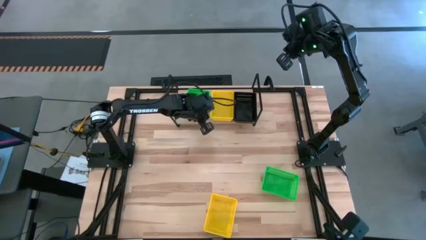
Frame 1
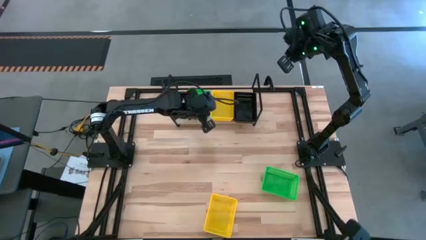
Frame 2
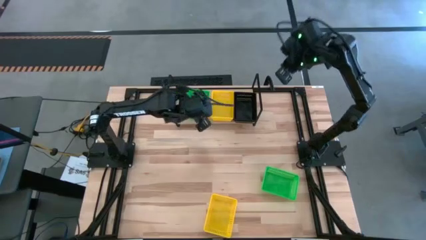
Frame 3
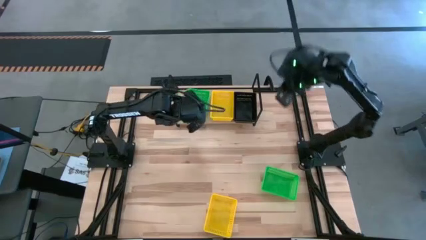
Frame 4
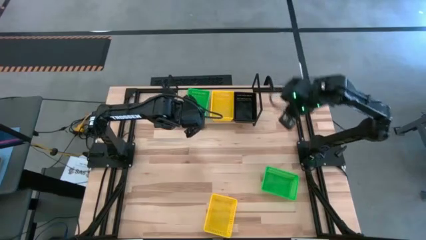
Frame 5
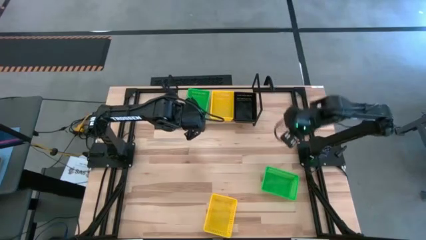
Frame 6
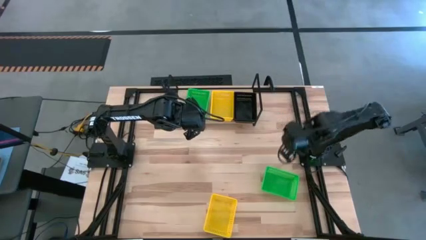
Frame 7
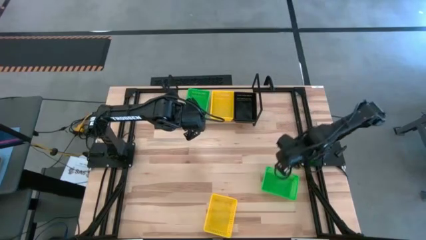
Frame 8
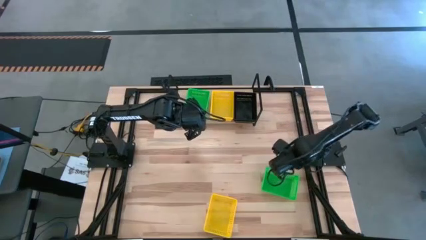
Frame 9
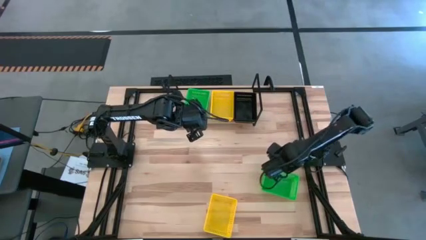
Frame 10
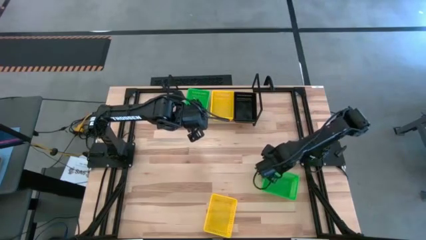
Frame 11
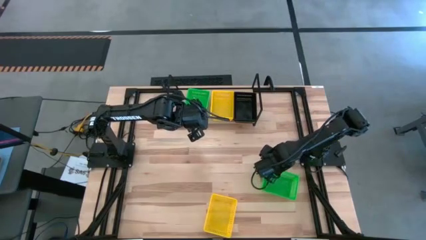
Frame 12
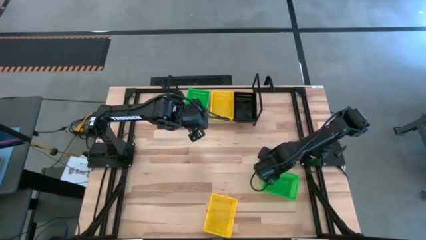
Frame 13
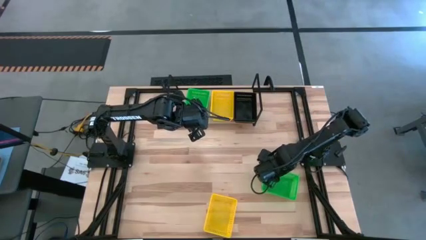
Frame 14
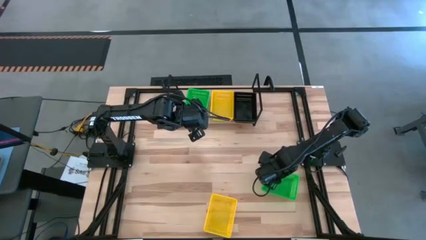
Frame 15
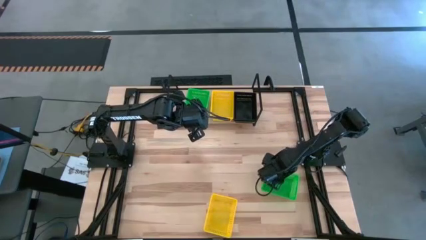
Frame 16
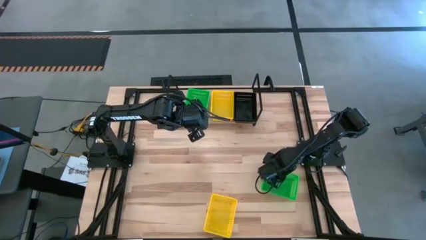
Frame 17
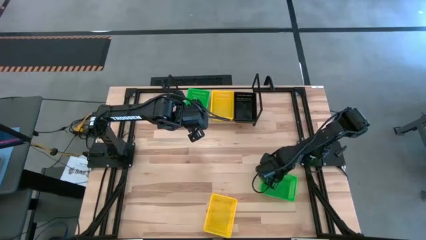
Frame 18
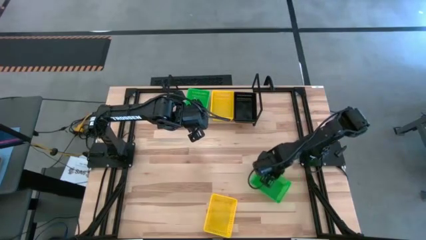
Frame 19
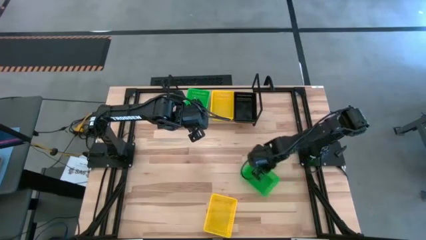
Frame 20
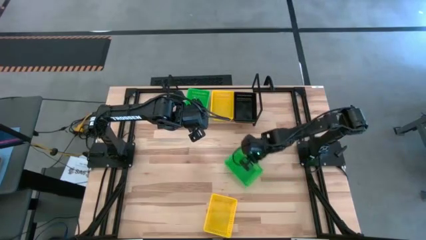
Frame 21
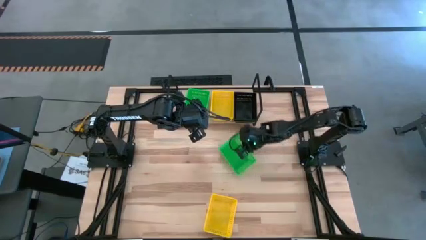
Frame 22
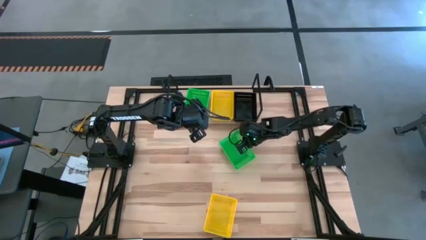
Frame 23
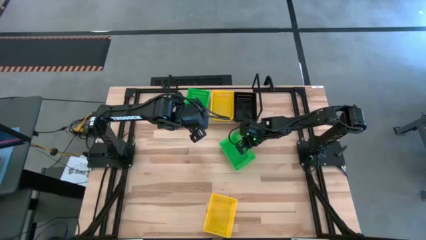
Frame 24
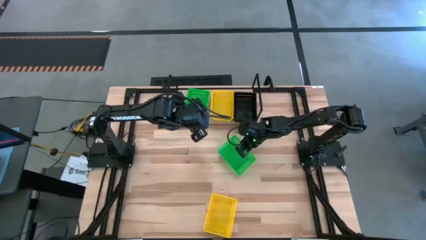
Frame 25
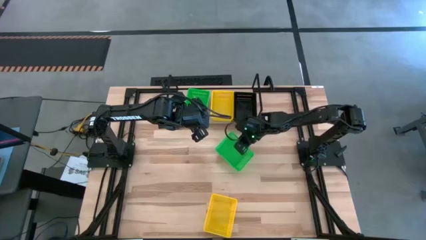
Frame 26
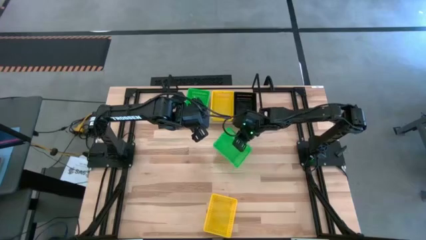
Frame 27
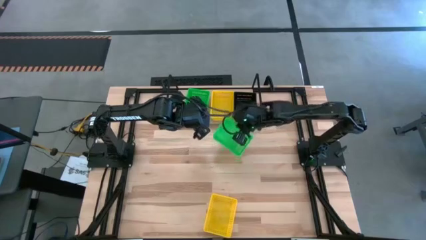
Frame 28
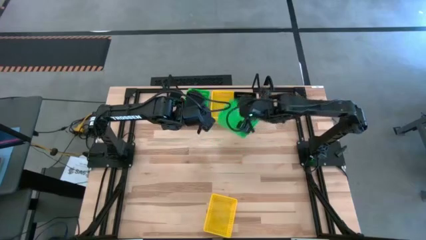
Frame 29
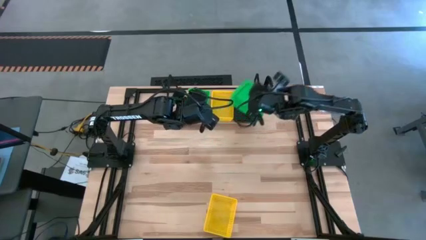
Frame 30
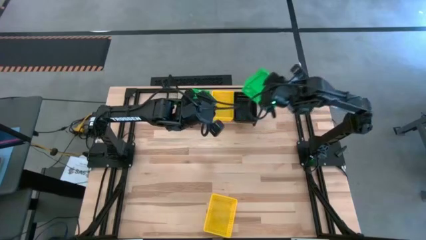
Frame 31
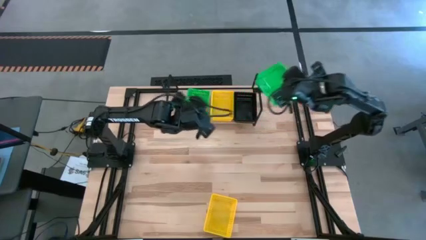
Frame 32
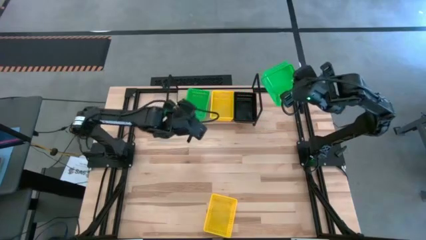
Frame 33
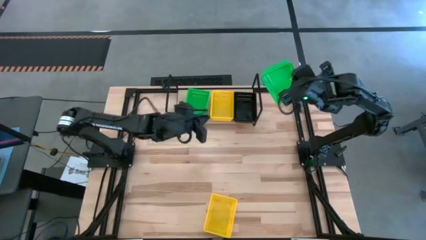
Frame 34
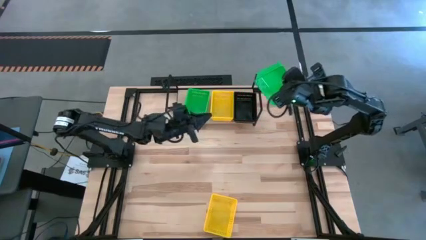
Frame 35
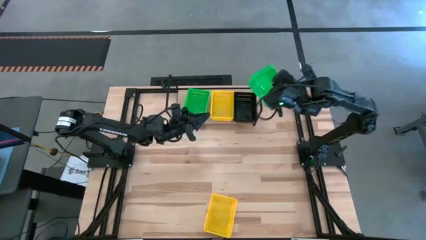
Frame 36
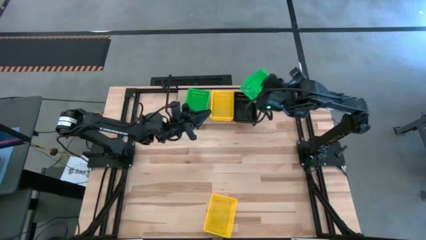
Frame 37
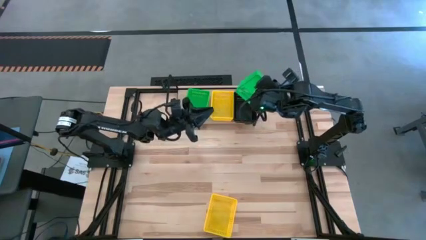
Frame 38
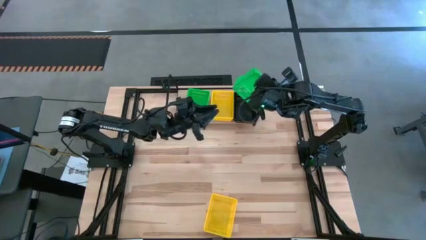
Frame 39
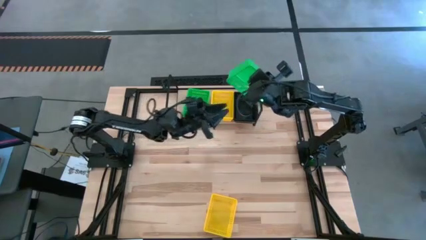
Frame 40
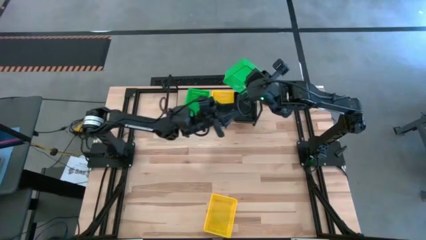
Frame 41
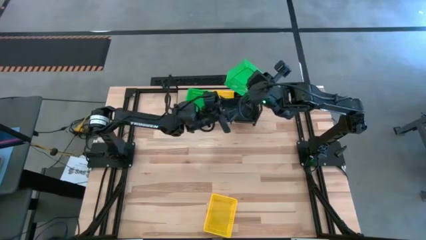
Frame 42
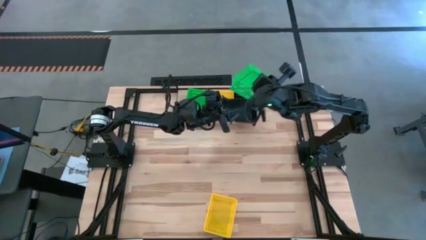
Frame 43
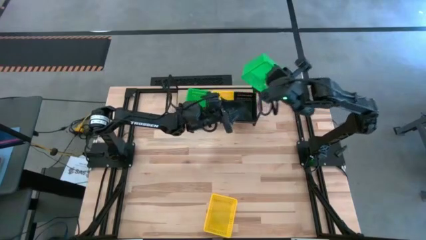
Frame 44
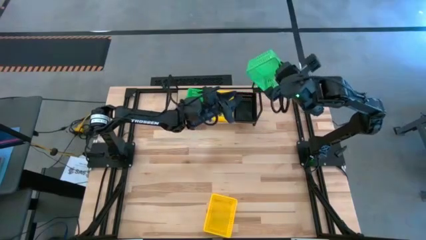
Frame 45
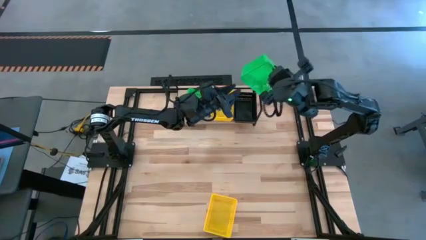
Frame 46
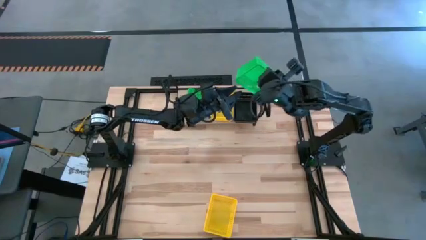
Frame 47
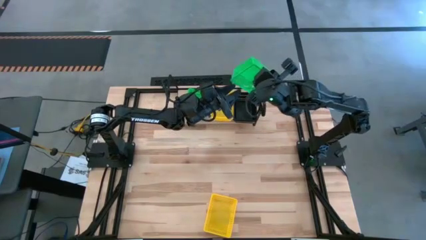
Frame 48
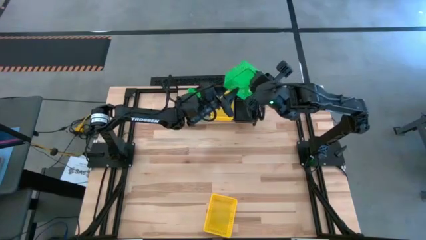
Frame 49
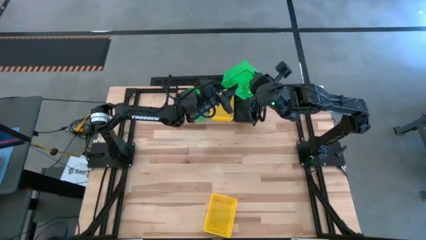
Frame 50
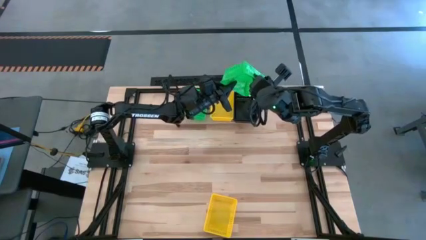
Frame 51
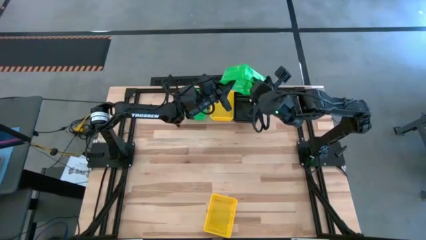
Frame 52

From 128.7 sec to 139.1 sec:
Task: Stack baskets on shelf by color
Stack the green bin on the top of the other green bins on the shelf

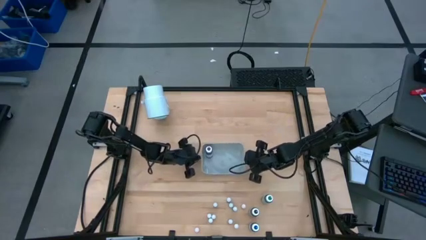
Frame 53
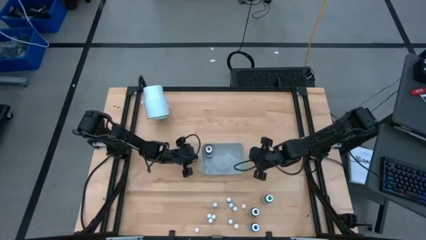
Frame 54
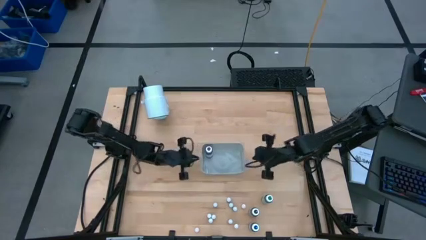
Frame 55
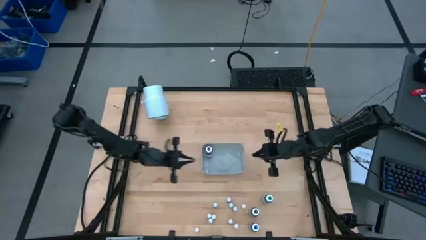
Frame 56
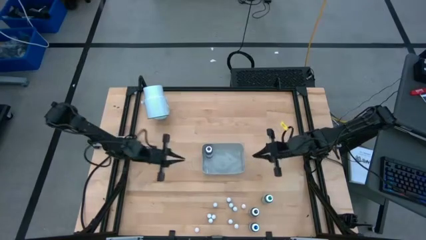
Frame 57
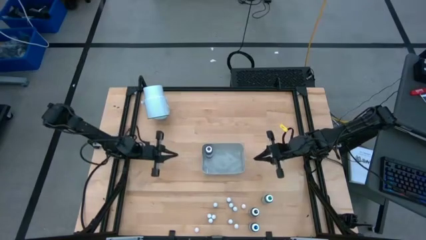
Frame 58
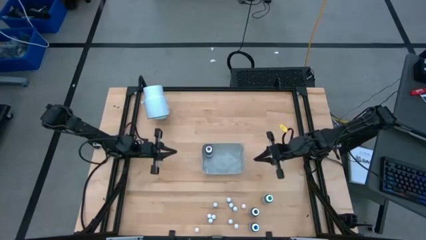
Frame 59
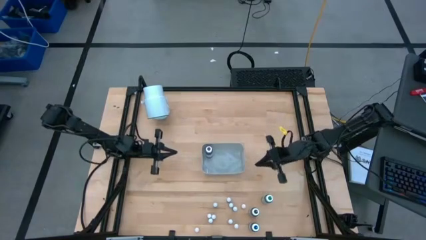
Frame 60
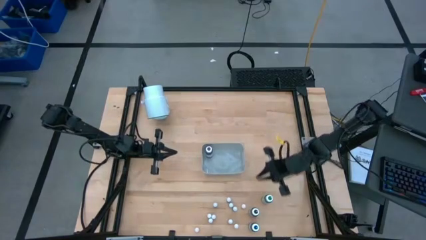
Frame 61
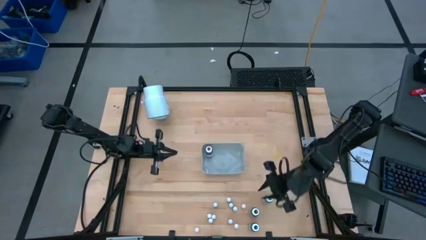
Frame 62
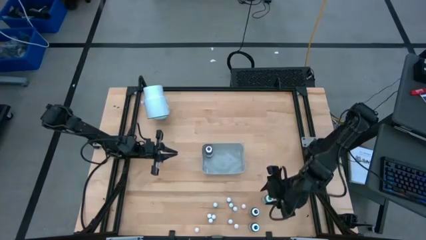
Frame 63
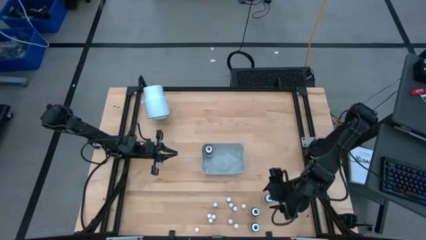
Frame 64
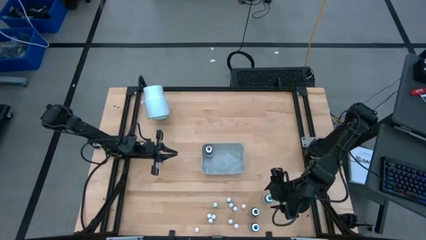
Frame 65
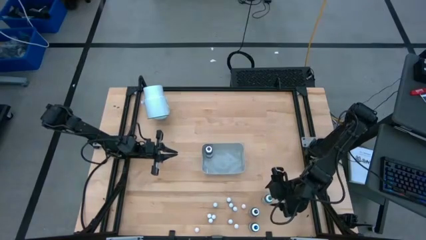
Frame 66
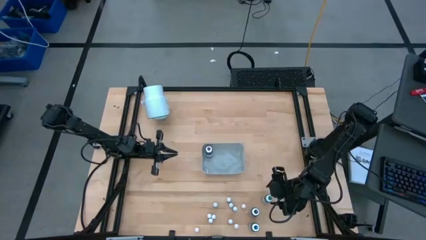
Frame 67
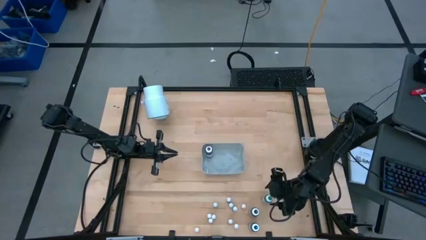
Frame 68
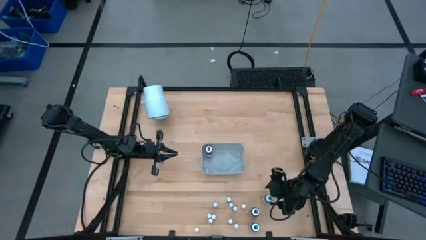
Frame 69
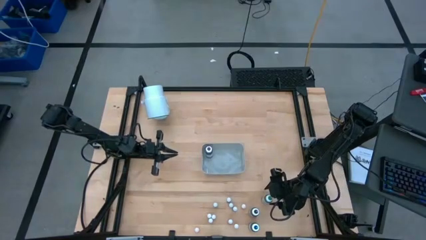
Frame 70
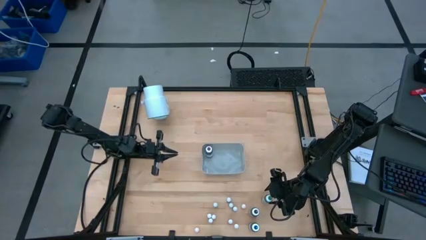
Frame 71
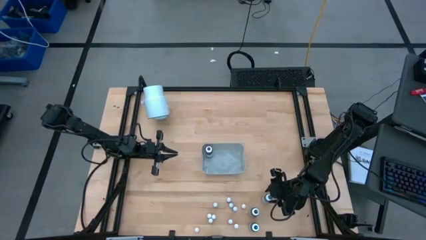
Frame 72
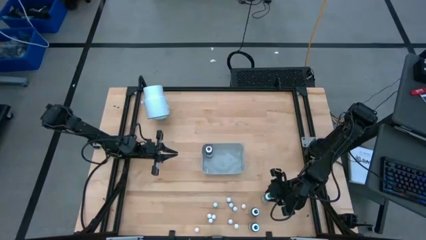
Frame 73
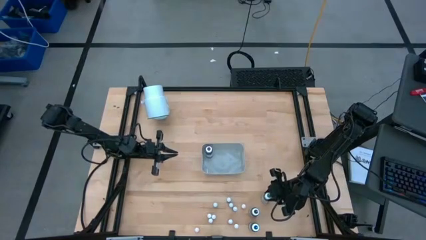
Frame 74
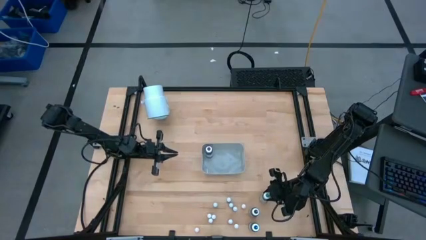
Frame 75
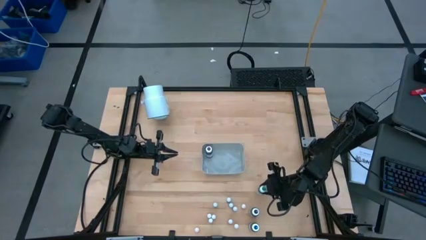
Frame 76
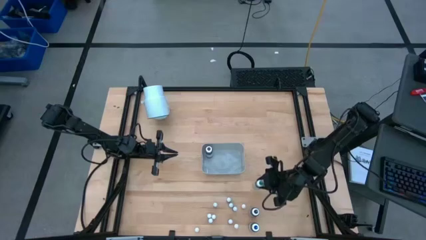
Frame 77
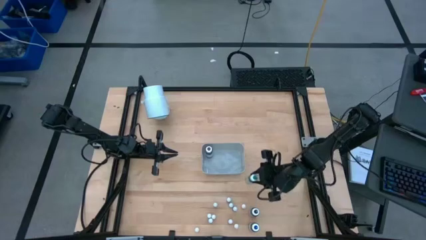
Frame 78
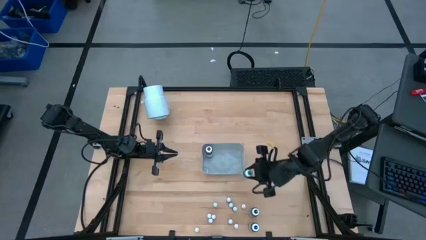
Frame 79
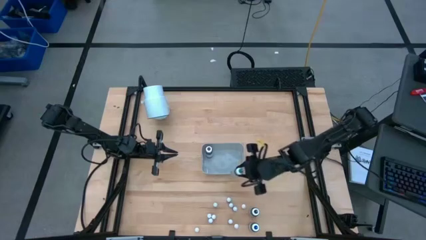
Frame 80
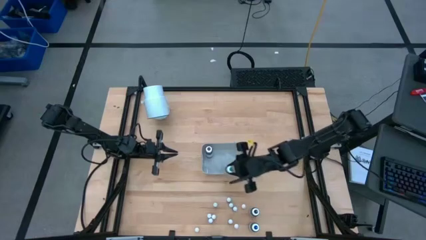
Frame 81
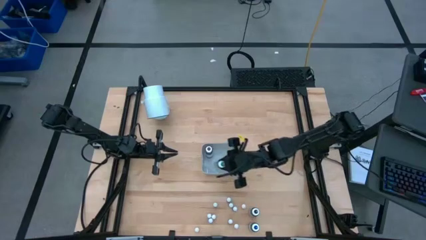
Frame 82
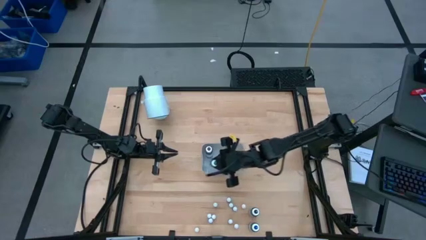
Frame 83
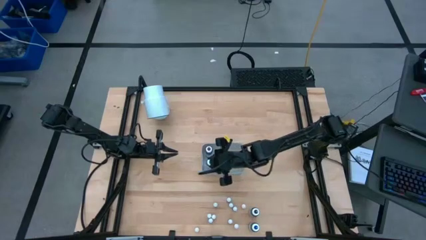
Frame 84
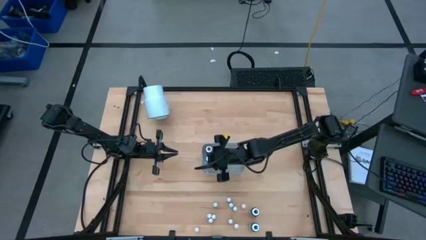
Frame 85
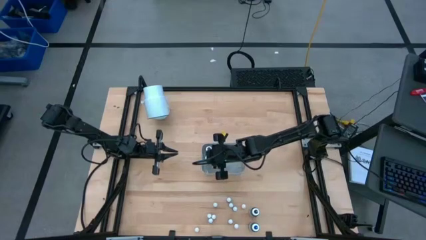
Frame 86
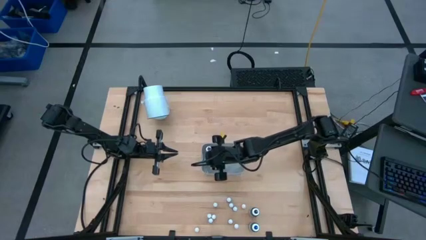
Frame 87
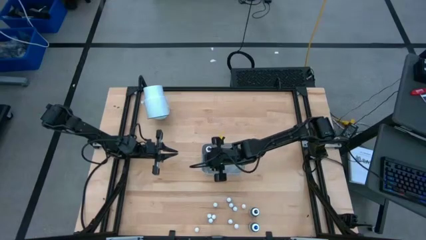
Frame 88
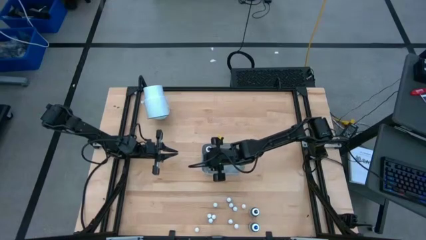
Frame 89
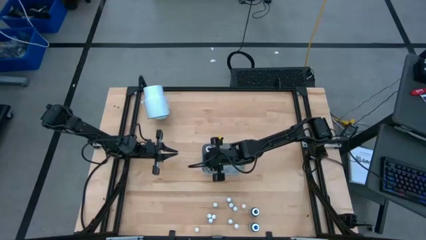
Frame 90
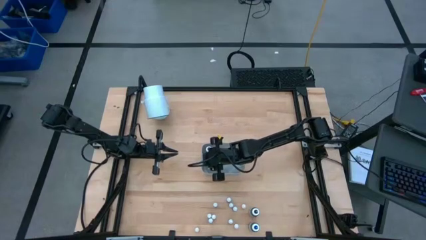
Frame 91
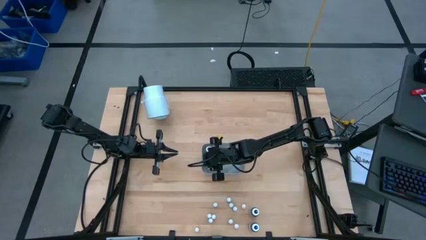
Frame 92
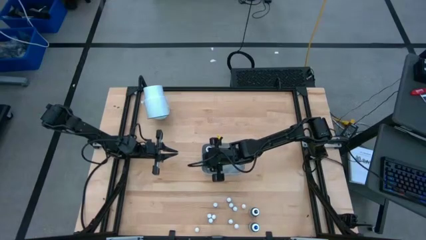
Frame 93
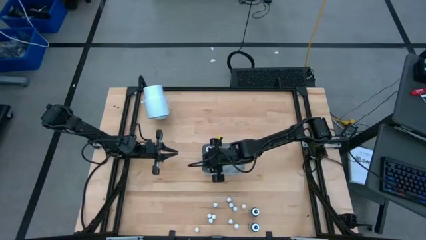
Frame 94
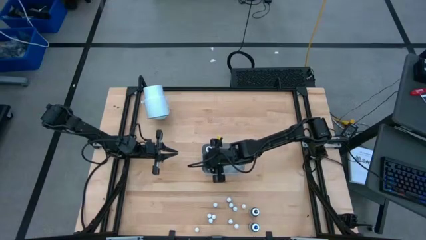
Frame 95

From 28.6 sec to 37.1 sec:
Task: Pick & Place food coloring
Put the large green food coloring bottle into the bin
